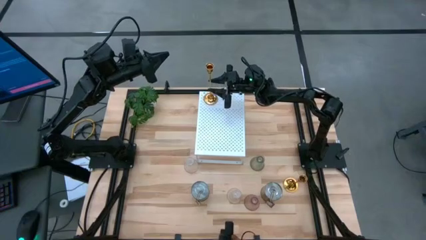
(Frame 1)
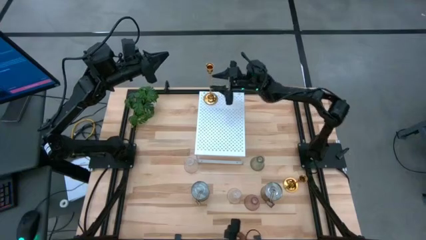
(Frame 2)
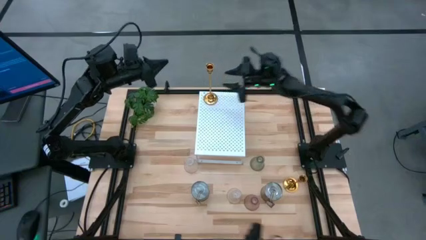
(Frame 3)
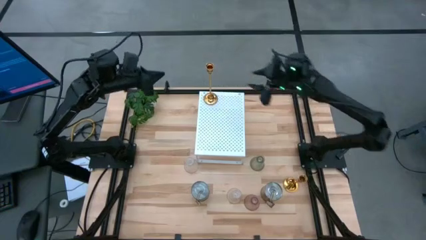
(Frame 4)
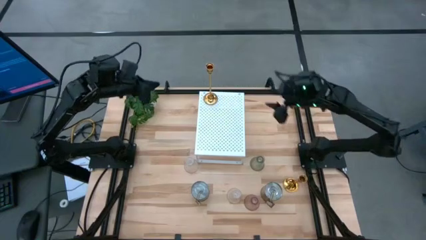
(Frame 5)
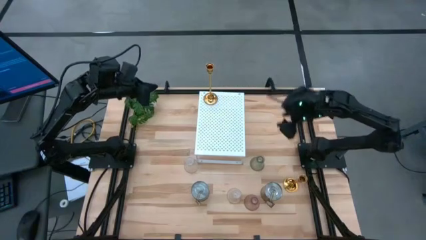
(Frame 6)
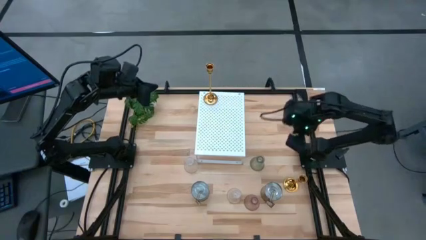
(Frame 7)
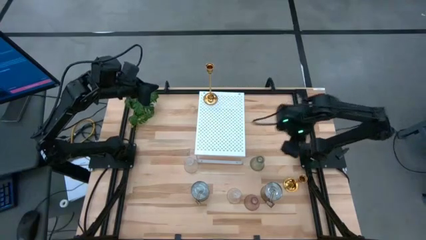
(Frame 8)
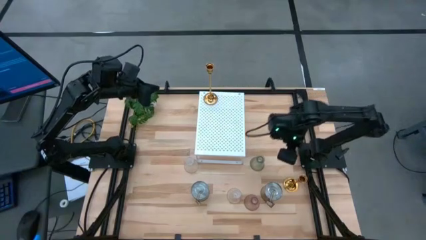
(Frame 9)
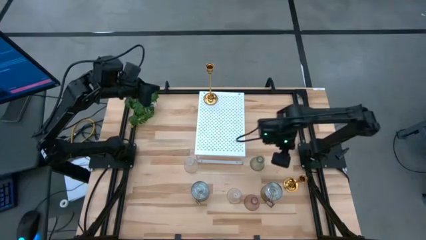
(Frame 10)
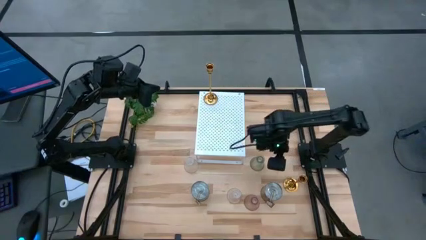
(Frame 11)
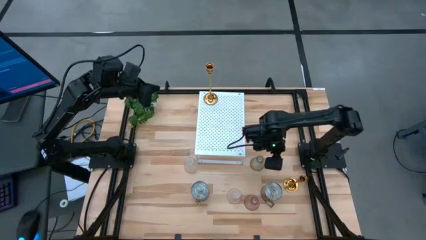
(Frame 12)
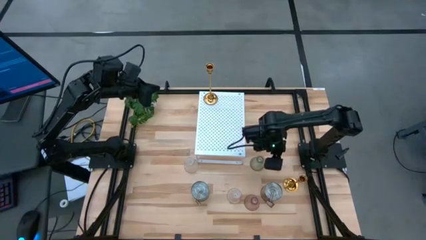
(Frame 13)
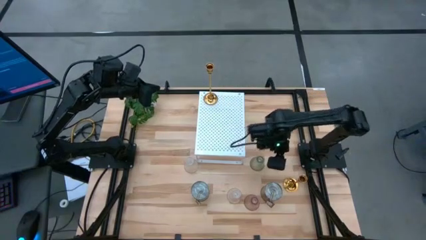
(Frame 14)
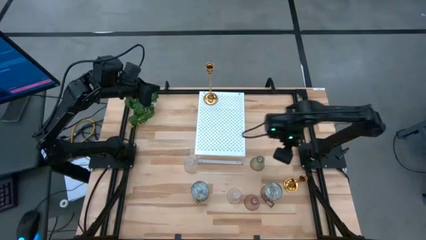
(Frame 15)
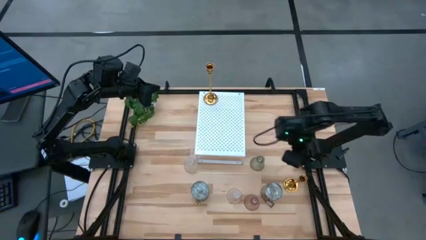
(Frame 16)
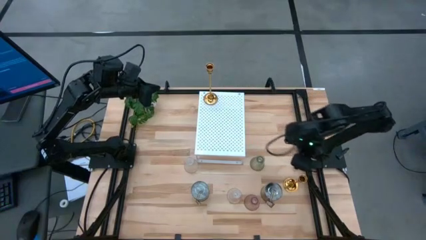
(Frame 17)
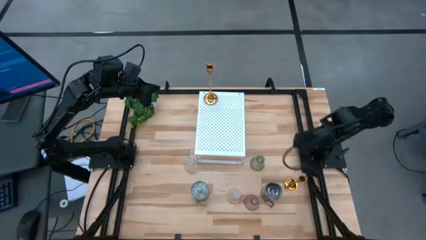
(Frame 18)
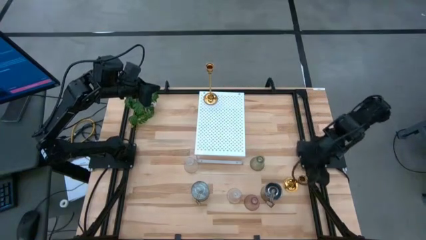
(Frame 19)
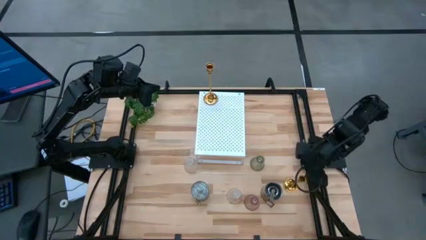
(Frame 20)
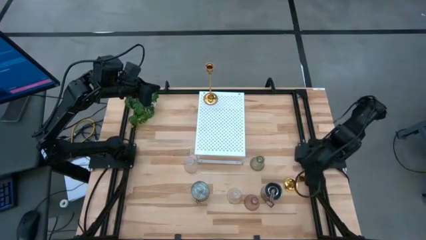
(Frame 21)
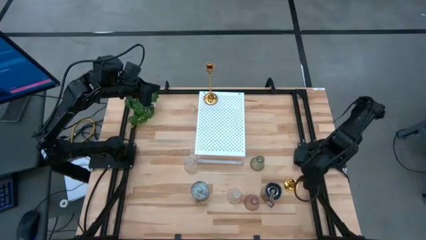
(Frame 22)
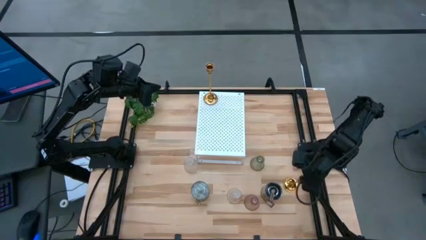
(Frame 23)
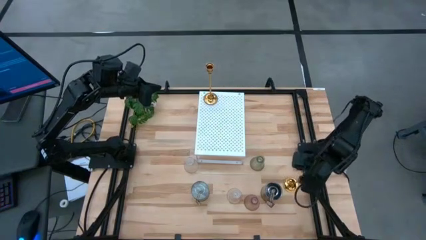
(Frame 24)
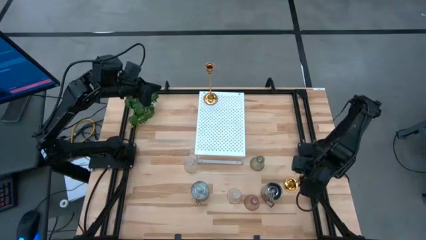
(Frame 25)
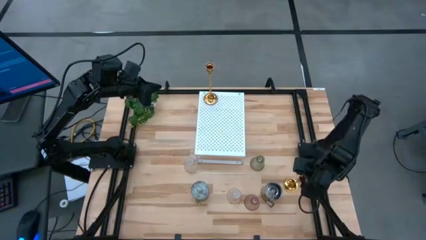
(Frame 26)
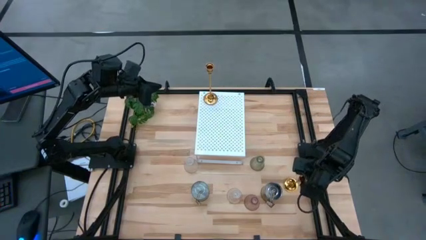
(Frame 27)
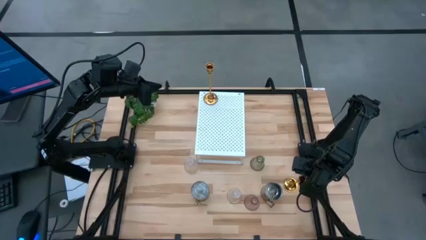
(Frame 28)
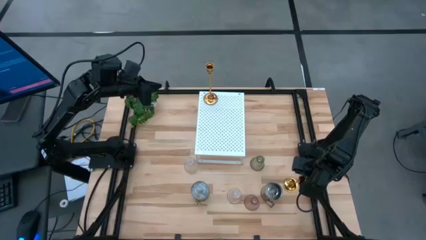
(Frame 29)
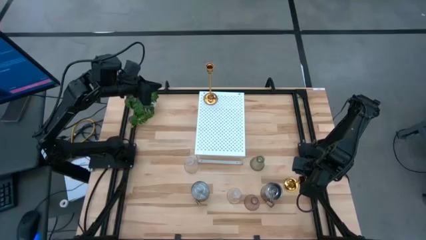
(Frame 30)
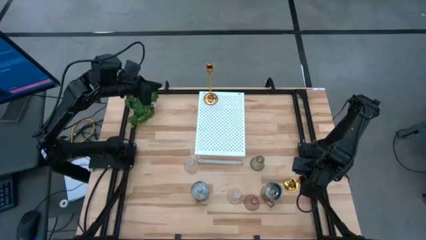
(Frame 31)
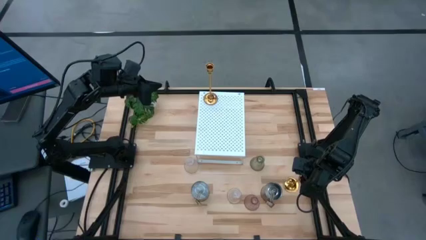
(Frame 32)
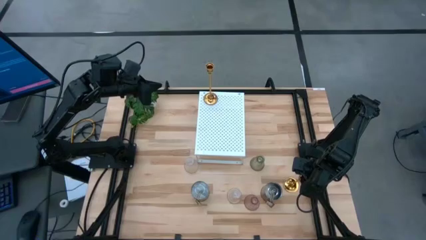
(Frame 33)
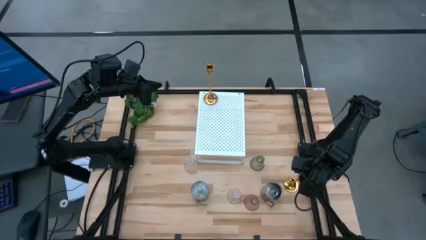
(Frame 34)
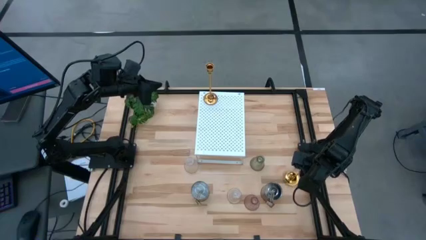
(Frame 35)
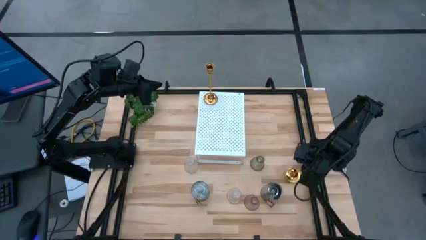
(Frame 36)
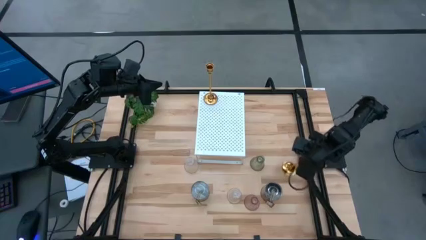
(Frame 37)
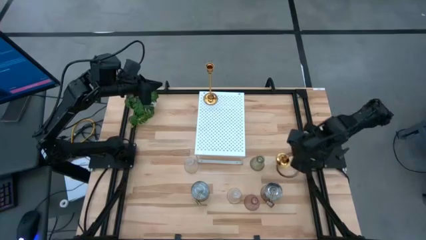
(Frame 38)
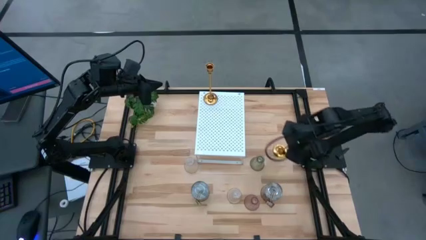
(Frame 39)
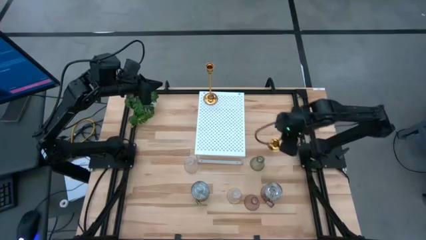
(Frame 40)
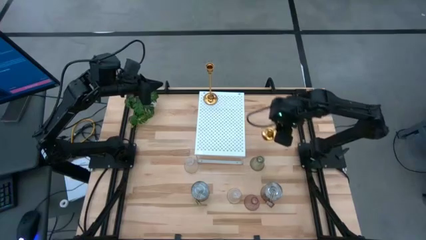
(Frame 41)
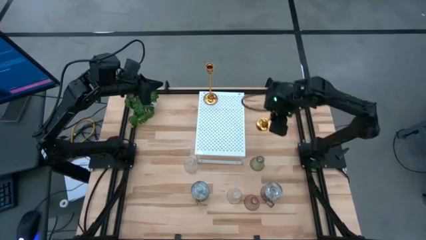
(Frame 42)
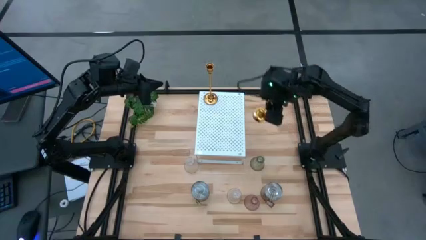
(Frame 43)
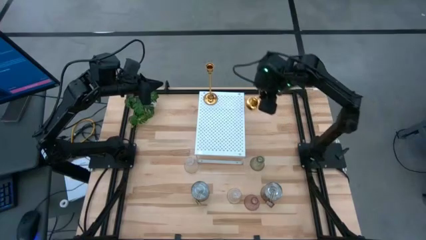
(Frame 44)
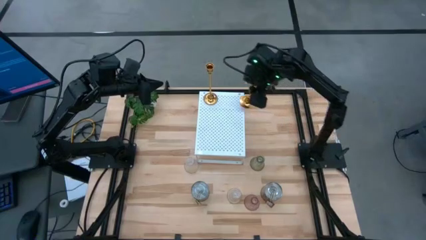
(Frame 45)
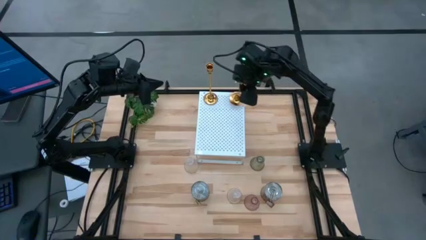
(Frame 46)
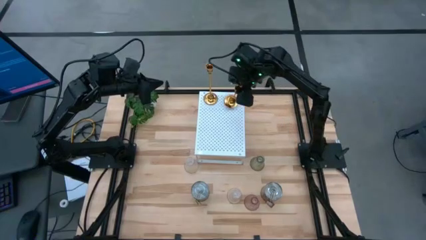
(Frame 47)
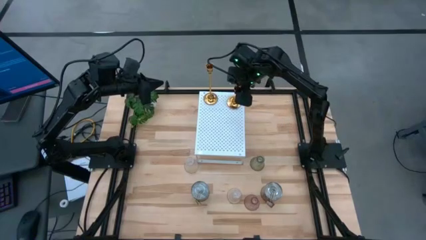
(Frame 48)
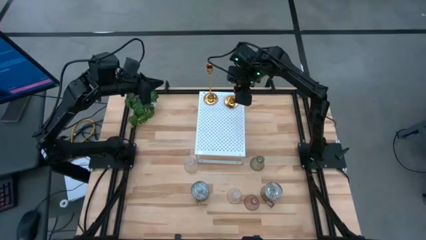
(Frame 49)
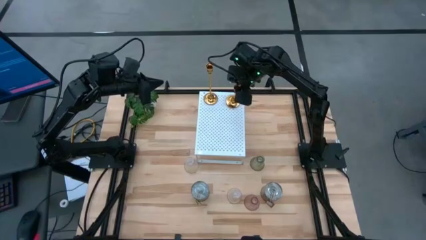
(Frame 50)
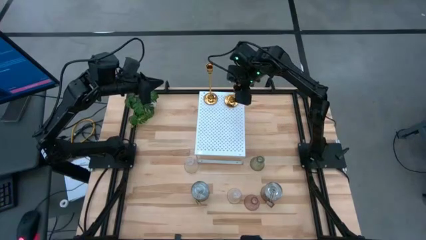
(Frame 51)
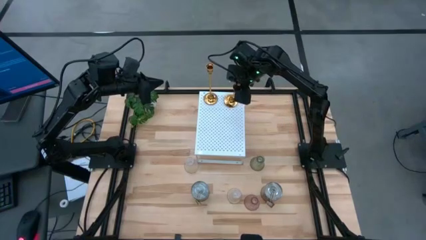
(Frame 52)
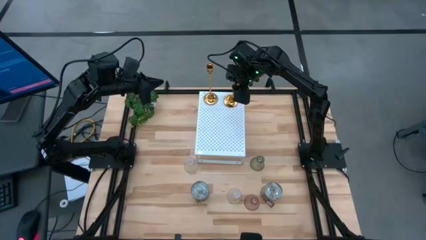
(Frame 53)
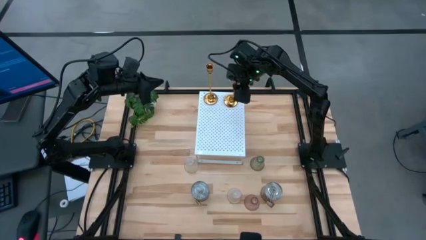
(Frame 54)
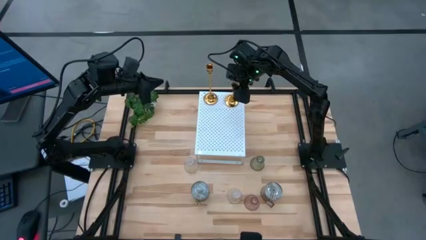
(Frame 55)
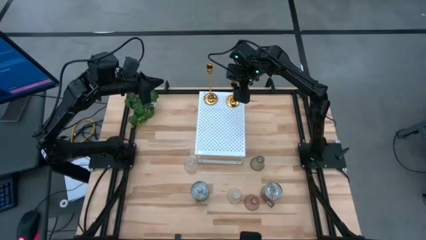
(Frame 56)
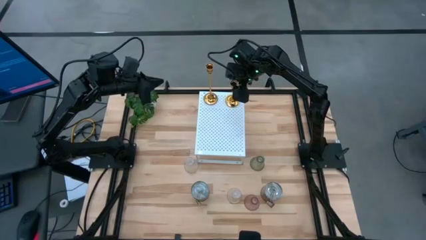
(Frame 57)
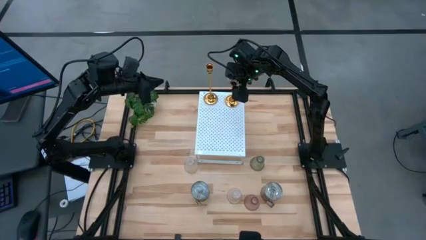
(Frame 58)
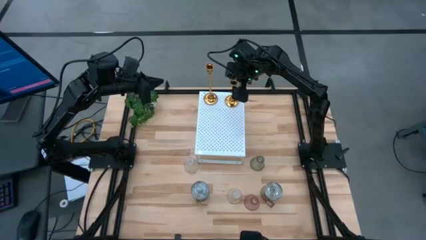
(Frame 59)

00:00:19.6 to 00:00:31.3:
Task: Pick & Place candle stick holders
Put the gold candle holder on the shelf
